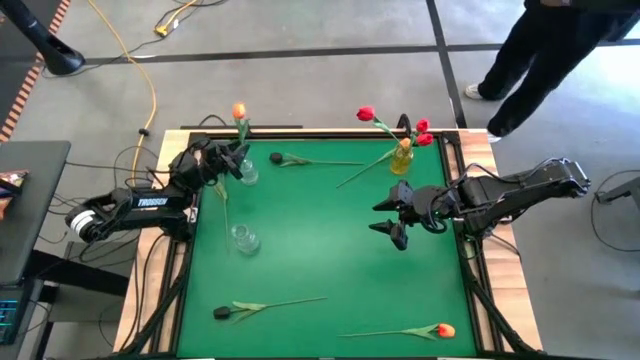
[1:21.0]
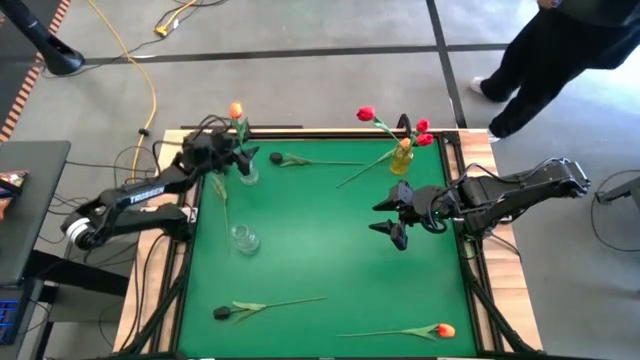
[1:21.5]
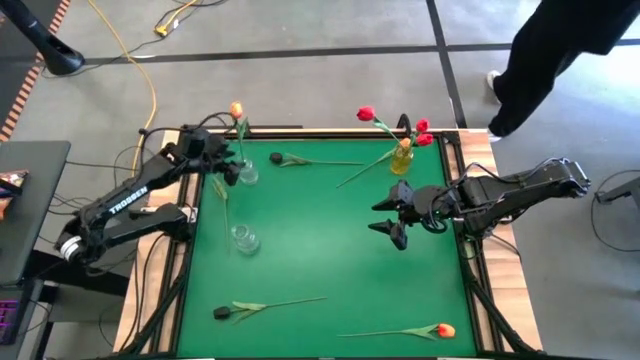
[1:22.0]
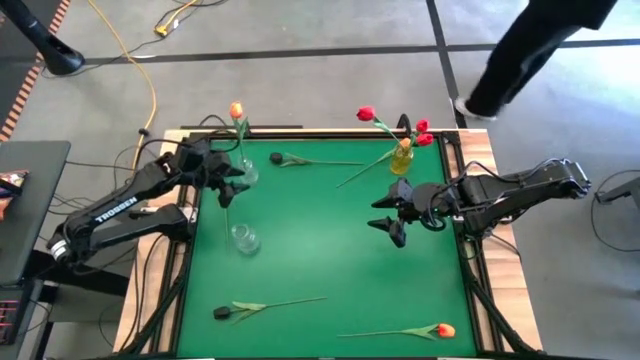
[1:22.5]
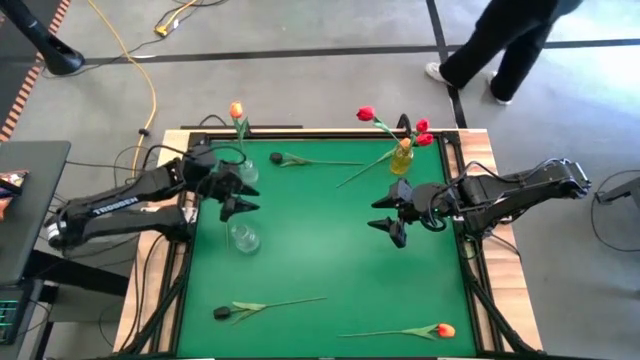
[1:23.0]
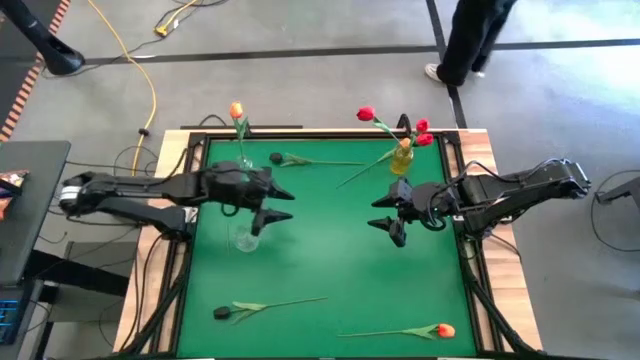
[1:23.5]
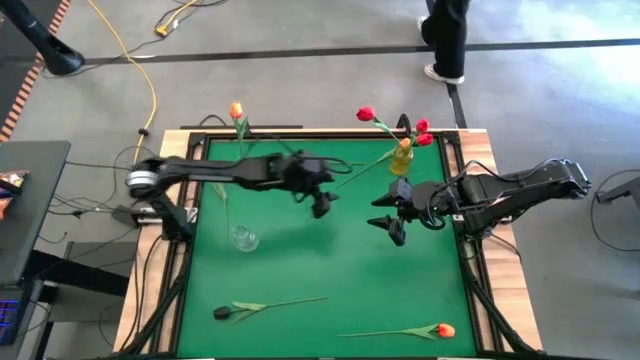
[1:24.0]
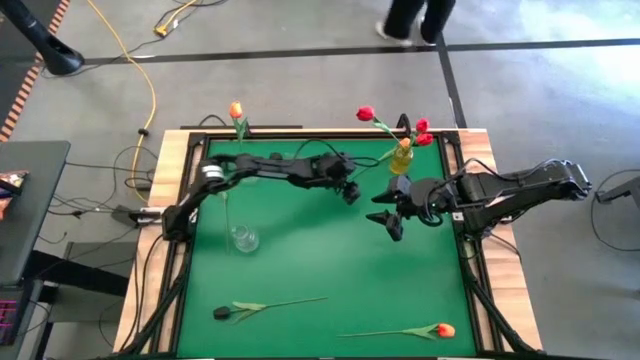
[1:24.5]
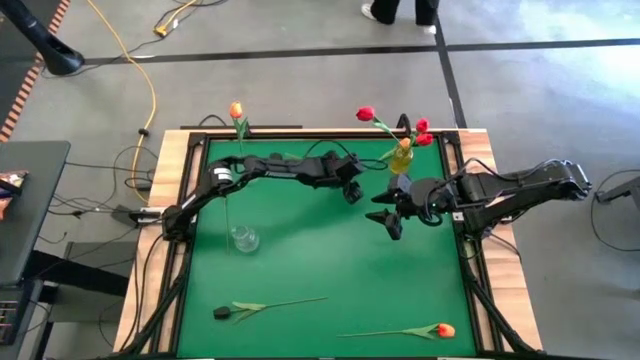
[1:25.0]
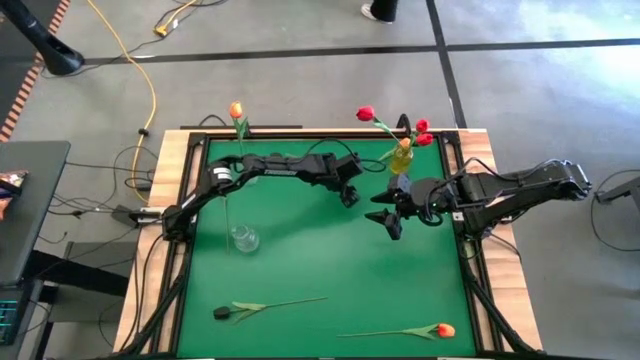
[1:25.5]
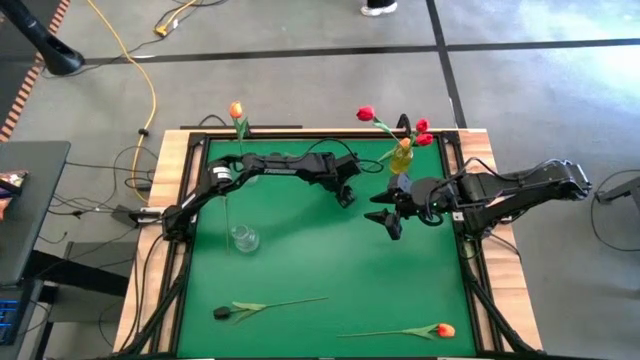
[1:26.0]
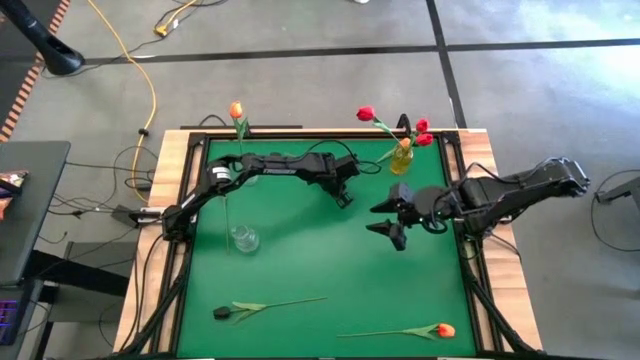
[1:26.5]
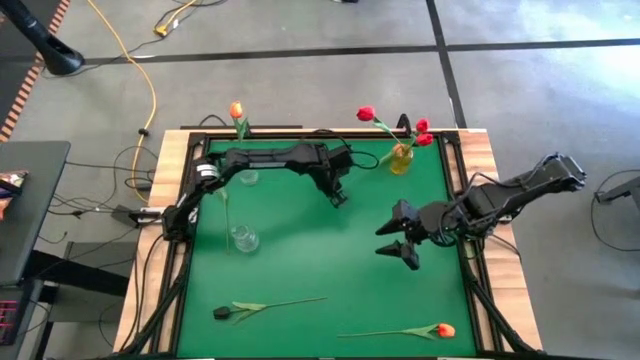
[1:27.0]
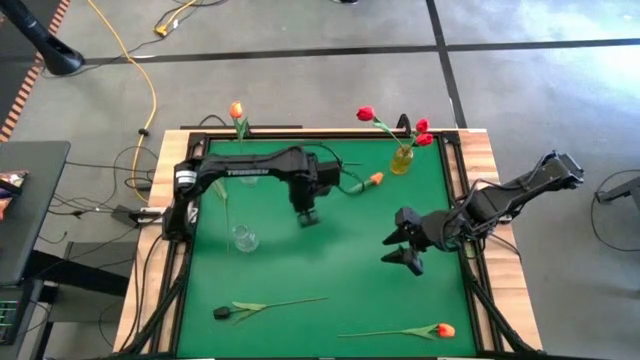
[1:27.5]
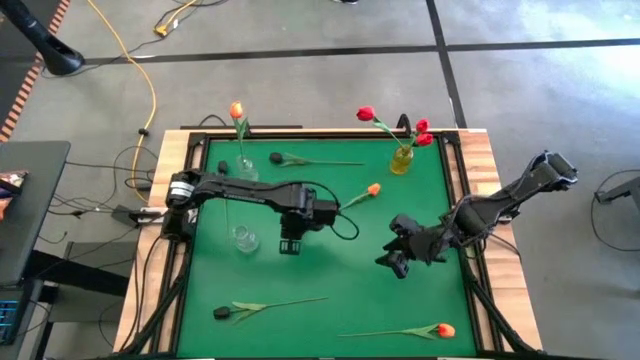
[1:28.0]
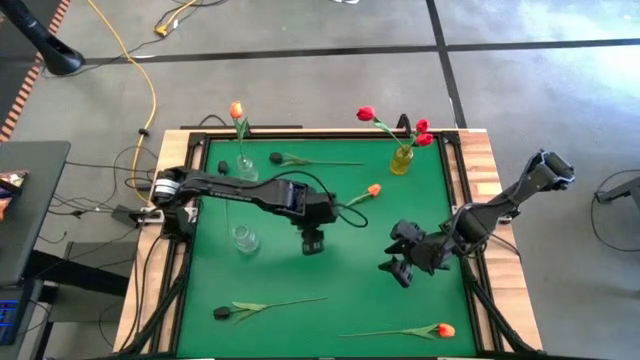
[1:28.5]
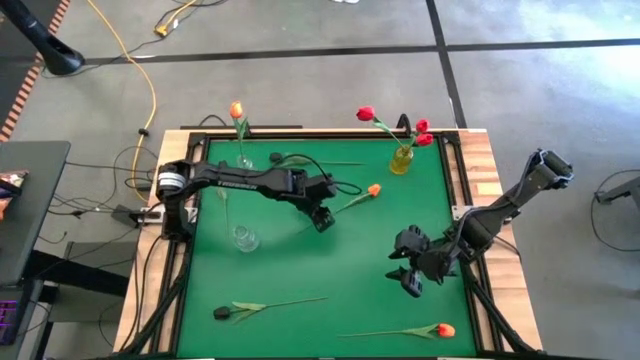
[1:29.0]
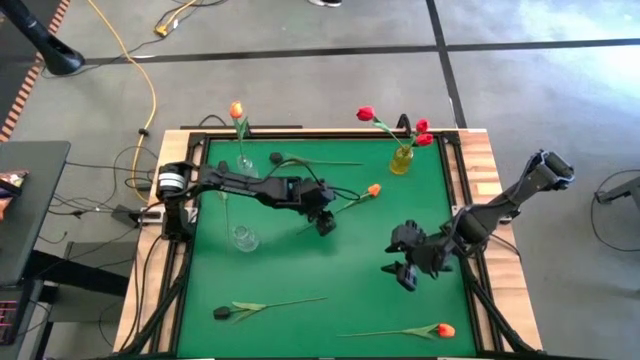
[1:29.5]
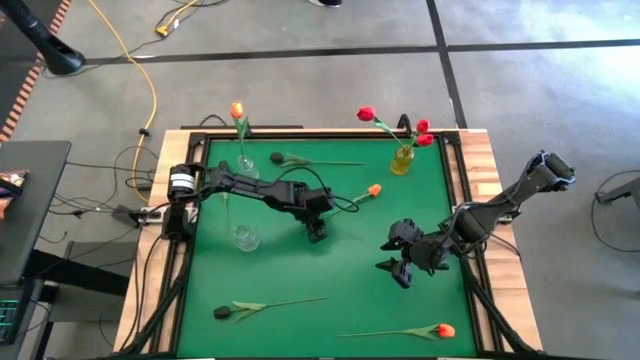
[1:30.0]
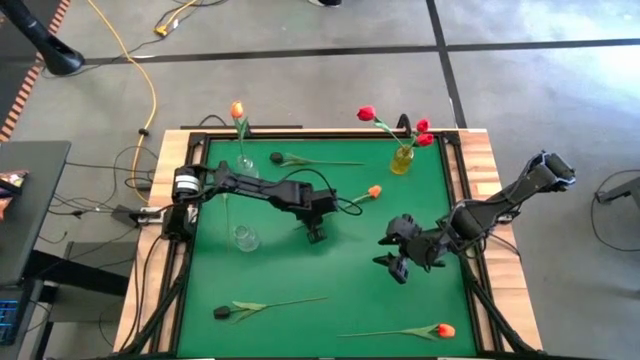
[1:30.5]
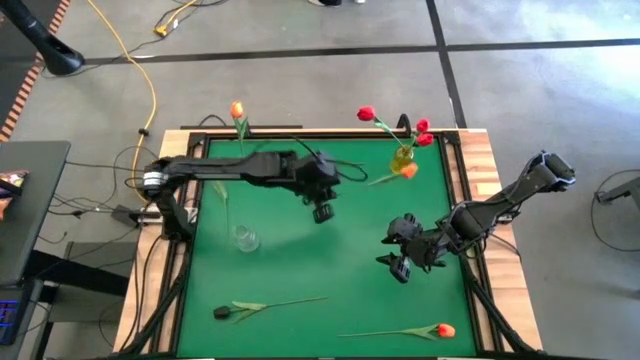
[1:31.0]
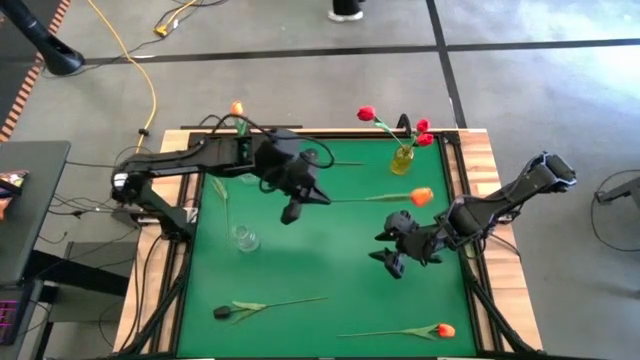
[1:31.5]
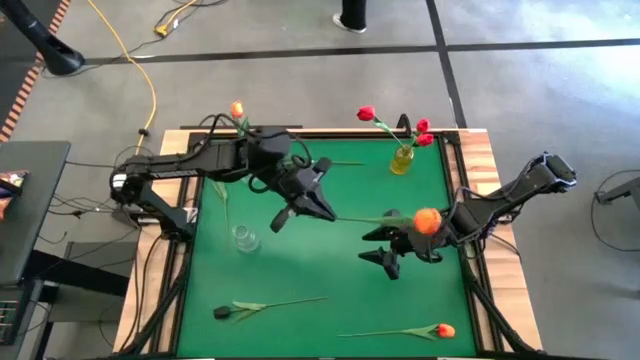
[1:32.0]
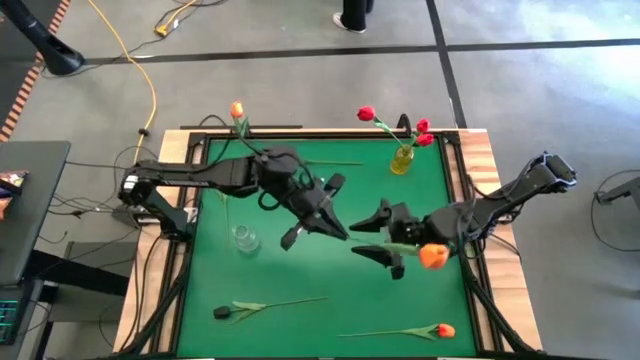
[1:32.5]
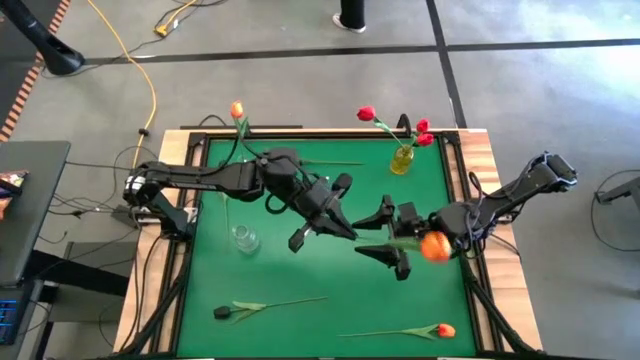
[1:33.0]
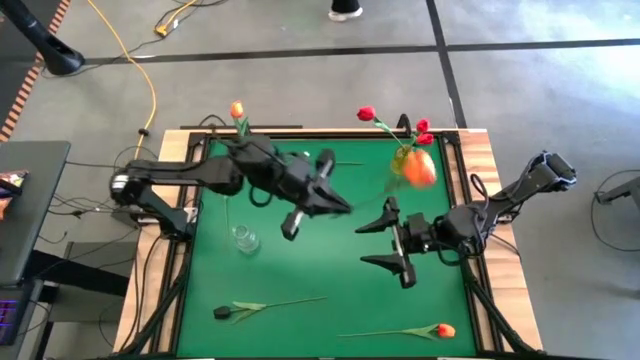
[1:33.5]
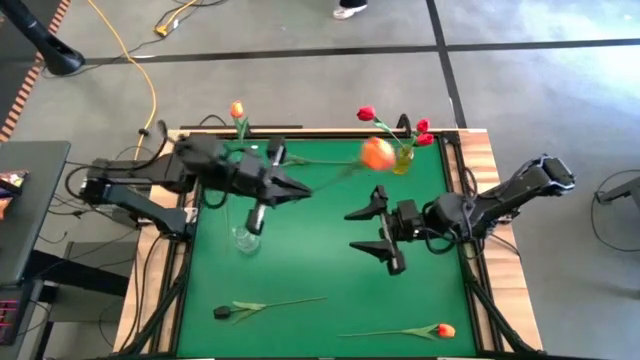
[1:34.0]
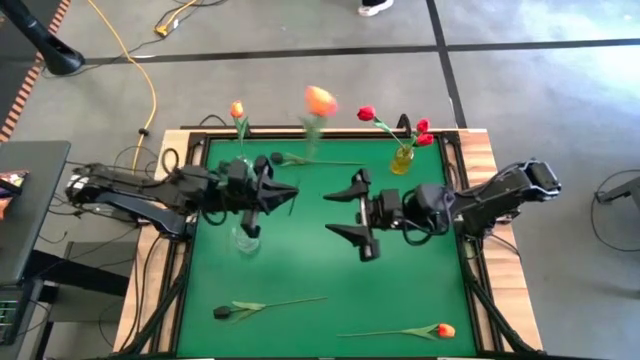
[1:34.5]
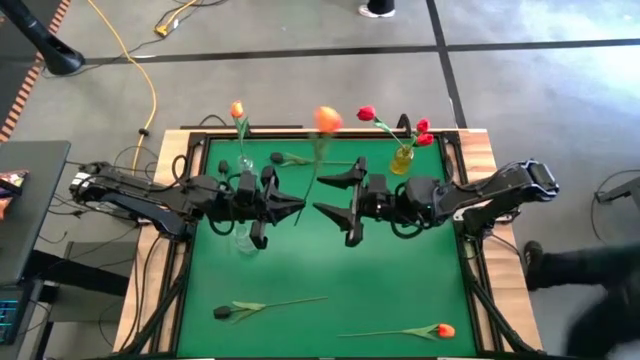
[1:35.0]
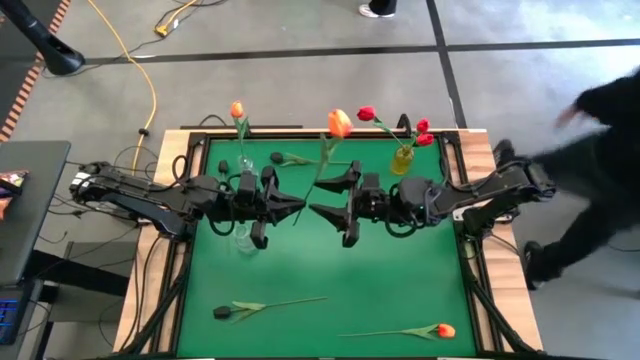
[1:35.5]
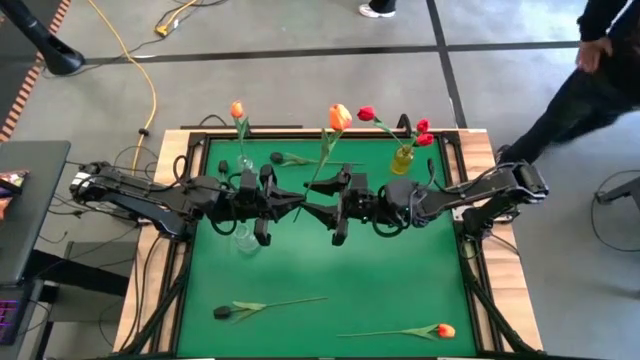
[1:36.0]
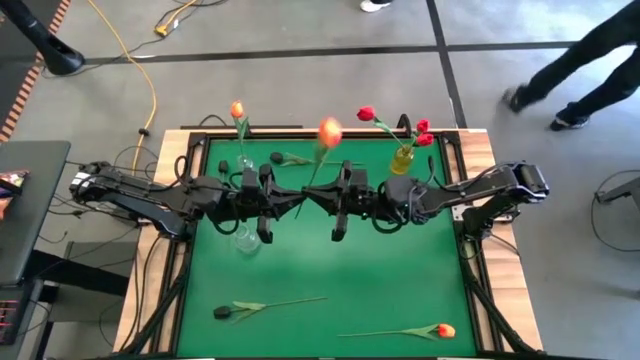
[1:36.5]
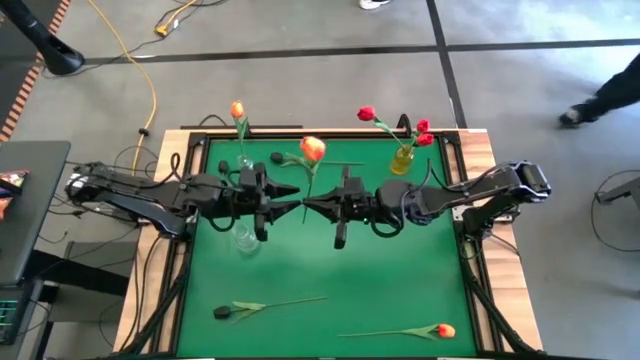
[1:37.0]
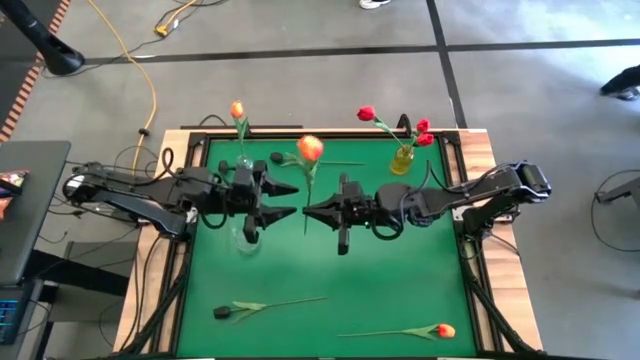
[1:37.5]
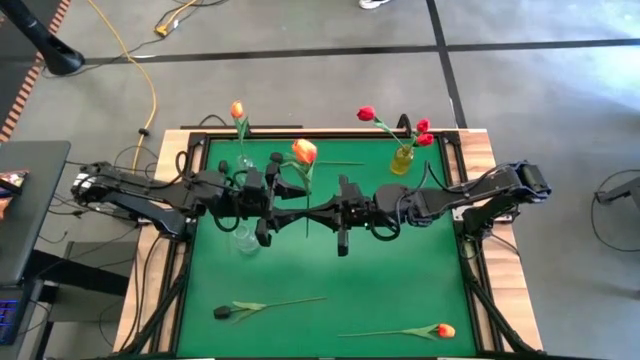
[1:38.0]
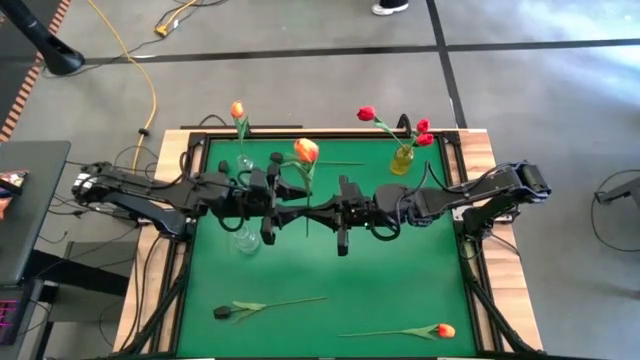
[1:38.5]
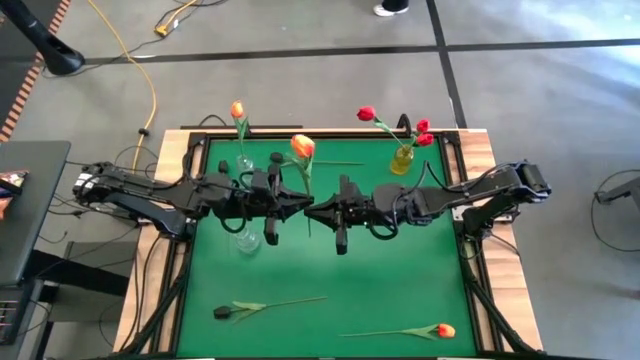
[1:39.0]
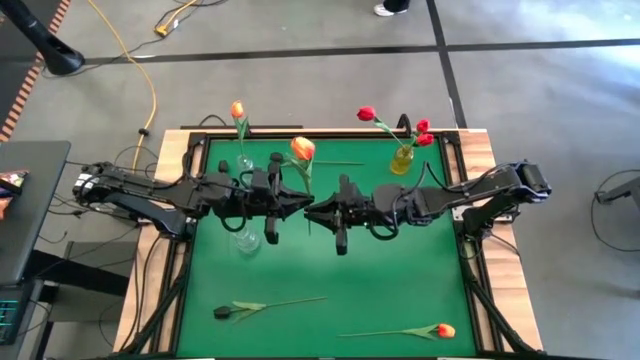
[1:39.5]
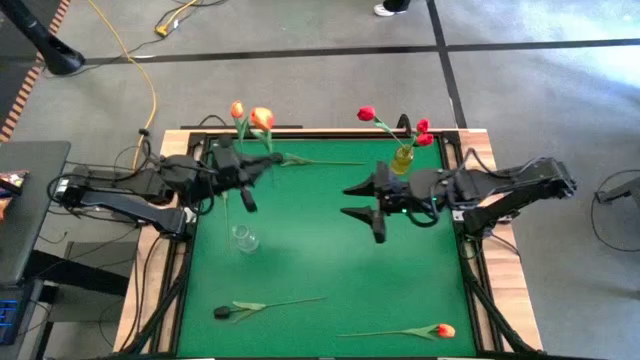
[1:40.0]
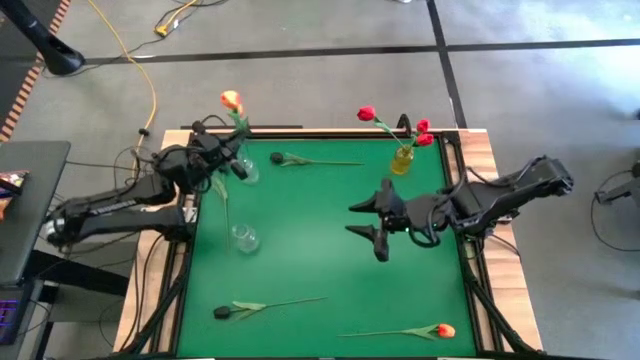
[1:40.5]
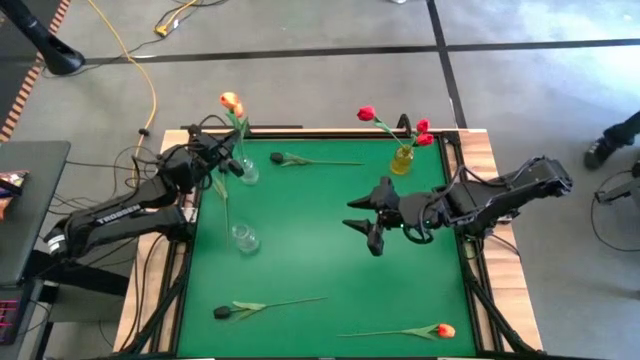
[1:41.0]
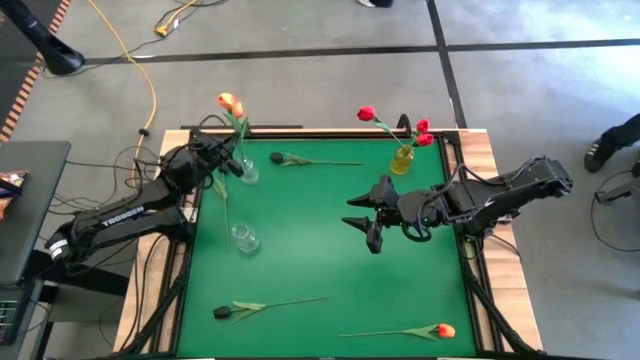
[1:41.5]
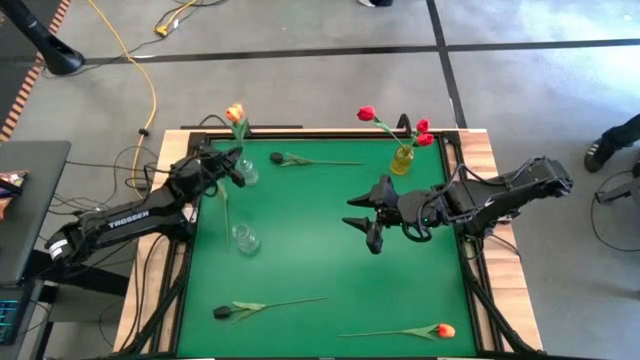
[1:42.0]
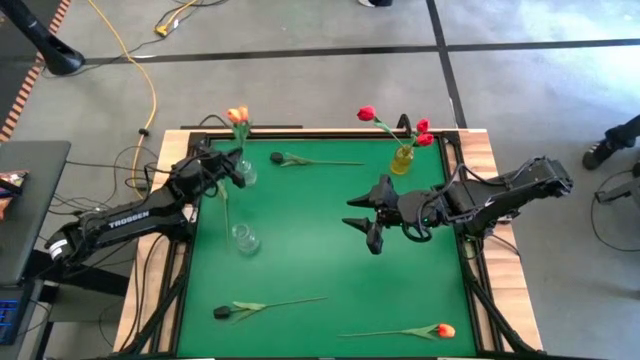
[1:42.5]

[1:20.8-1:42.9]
Task: Sort flowers into vase by color
Put the top orange flower into the top transparent vase

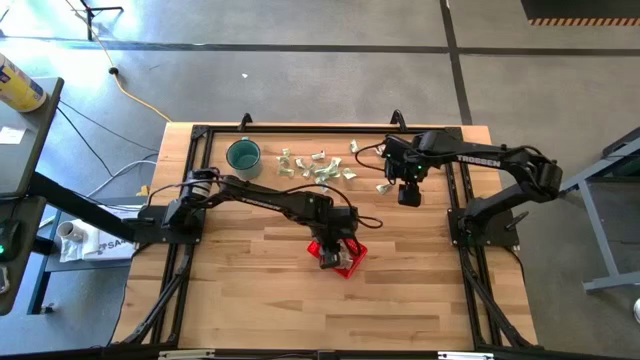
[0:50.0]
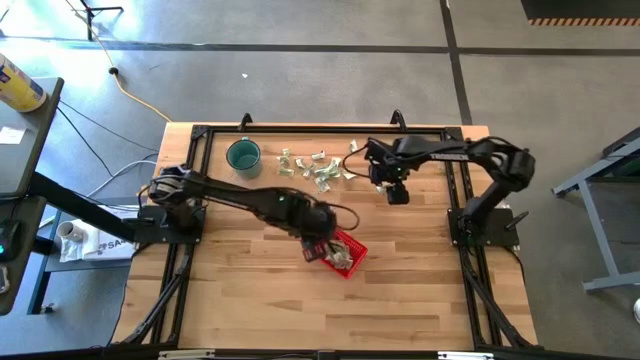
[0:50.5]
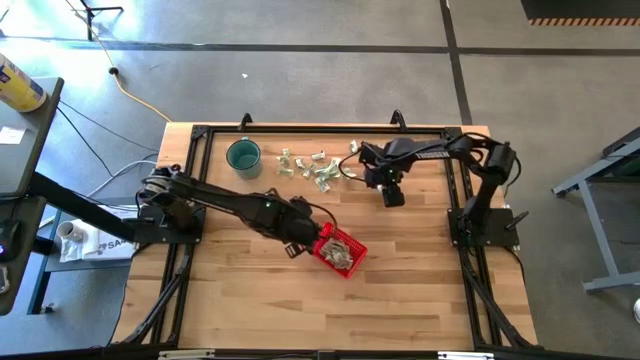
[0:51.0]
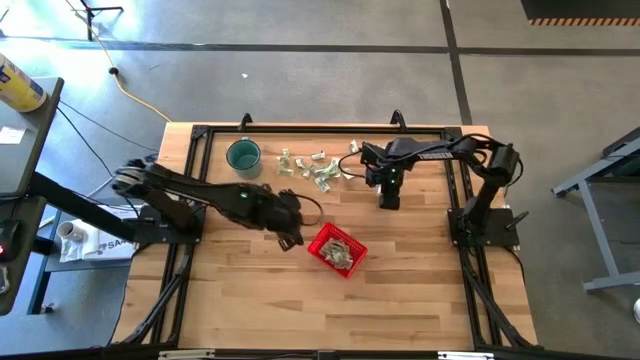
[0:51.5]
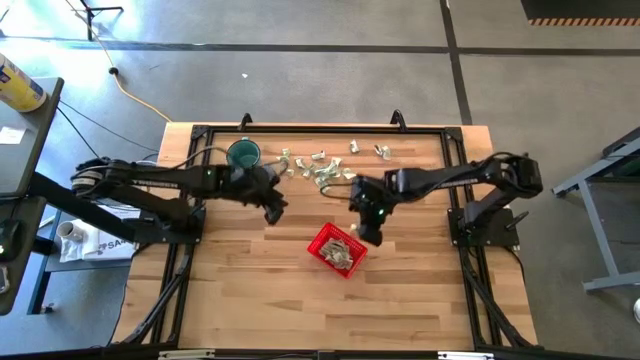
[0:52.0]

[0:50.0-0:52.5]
Task: Pick and place Stevia / Truvia into bins
Put the light green stevia packet into the bin
